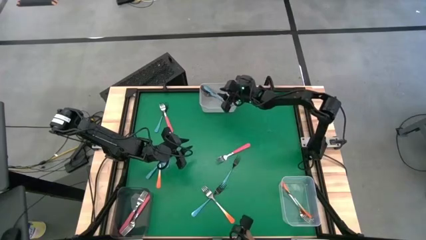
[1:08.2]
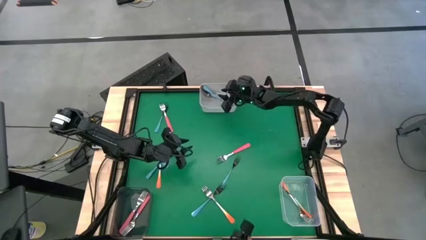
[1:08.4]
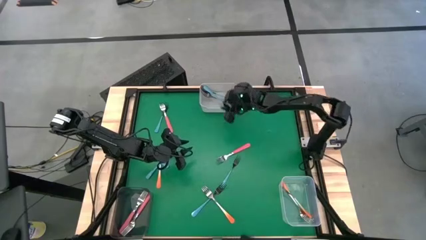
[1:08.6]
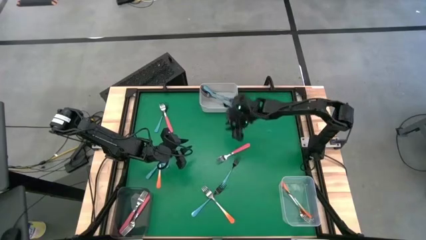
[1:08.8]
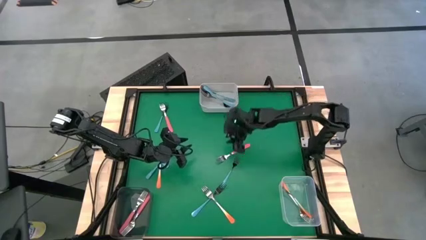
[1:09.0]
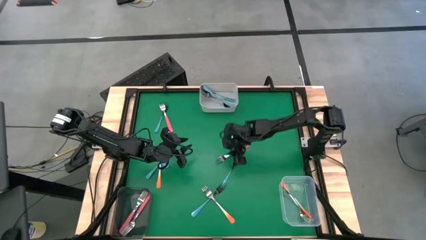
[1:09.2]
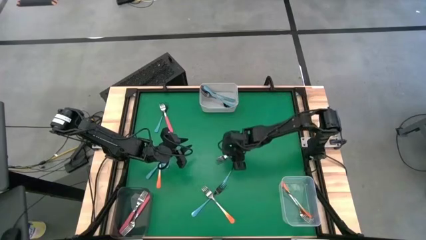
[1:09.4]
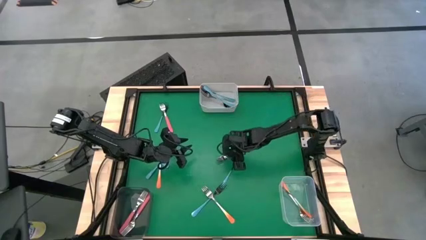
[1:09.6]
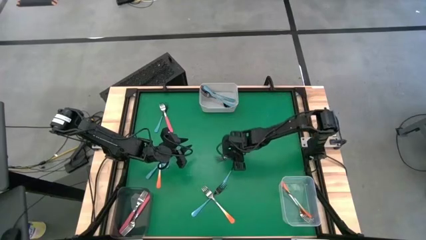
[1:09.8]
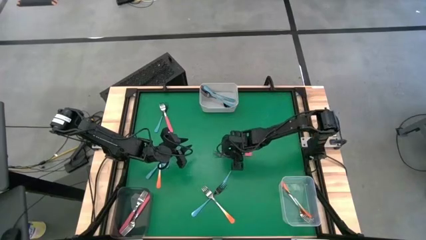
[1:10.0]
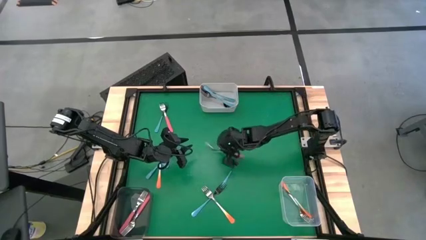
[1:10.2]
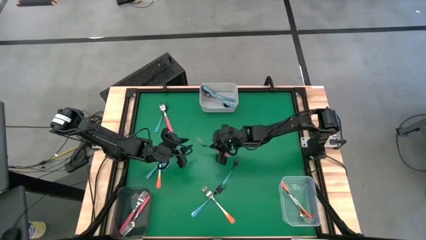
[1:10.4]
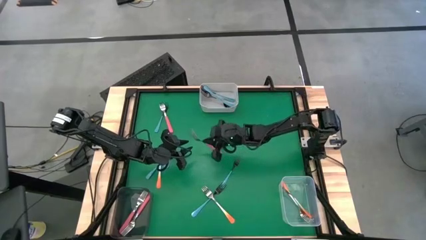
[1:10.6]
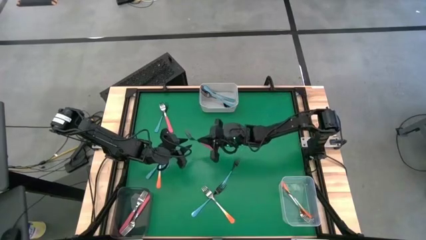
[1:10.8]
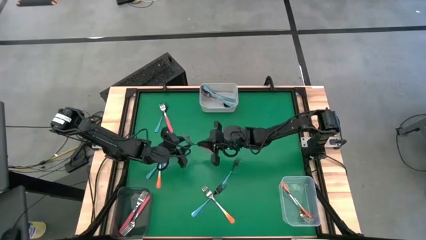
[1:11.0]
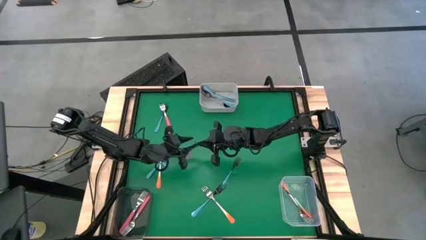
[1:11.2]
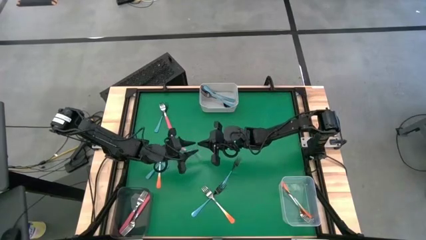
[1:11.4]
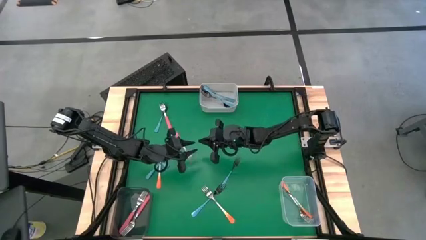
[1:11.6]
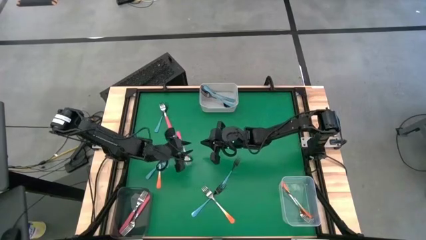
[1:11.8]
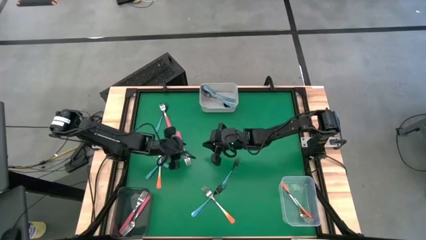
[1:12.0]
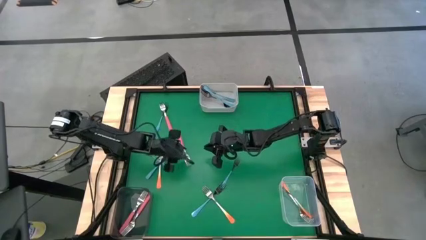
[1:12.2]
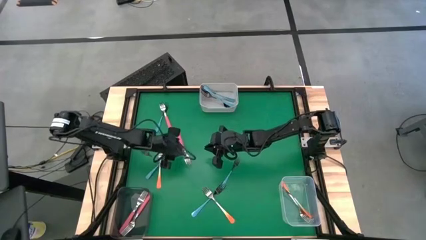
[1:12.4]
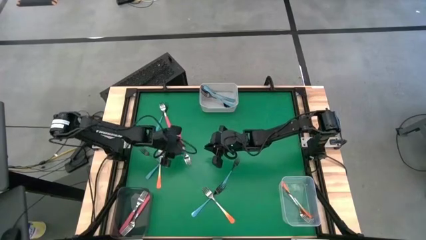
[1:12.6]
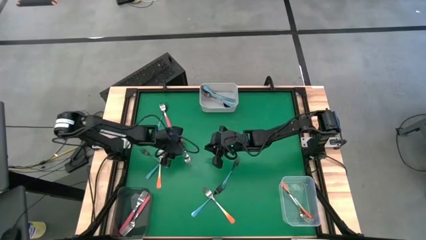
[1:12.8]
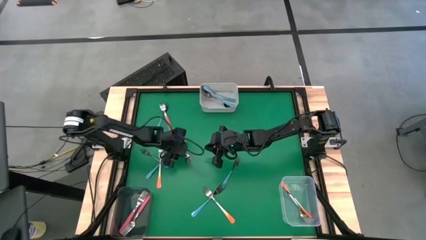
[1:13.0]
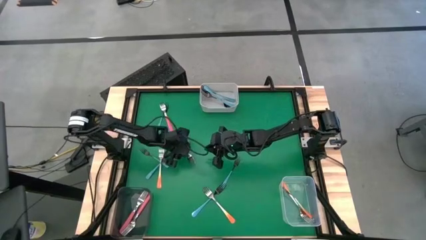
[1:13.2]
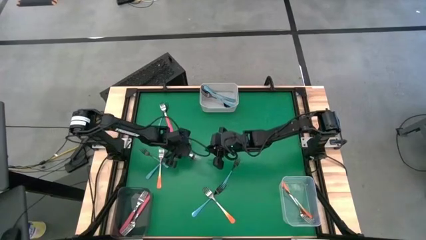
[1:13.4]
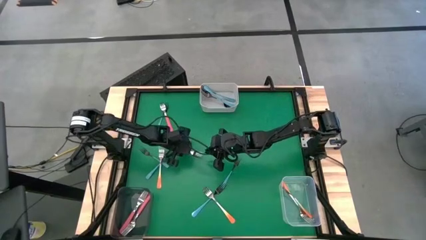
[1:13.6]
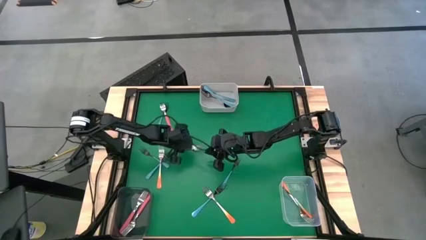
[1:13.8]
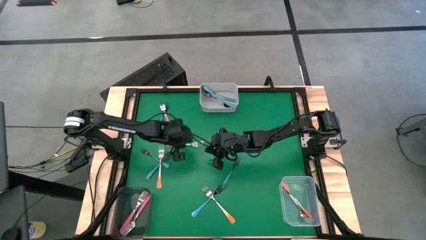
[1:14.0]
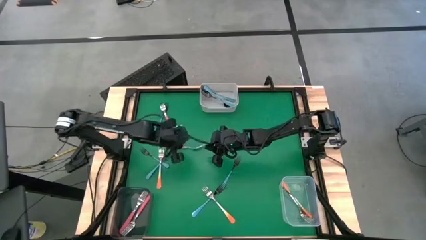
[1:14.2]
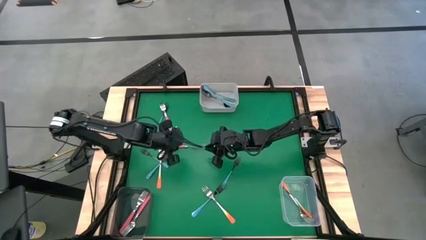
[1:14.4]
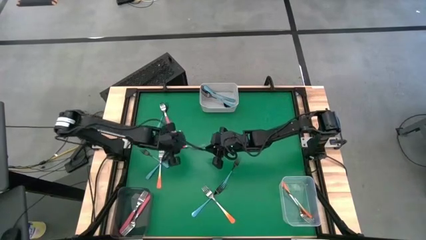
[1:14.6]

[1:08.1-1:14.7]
Task: Sort silverware by color (type)
Put the right red fork into the black bin

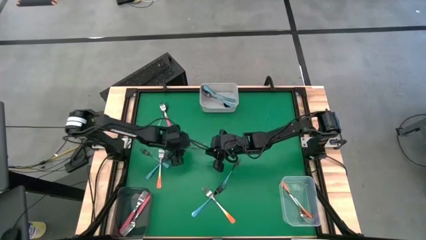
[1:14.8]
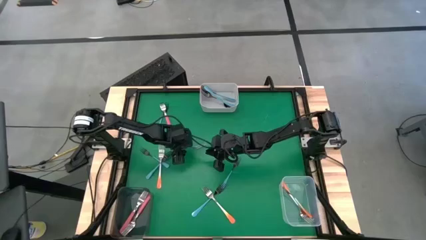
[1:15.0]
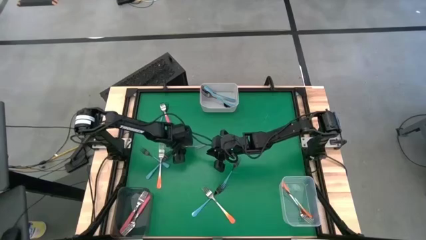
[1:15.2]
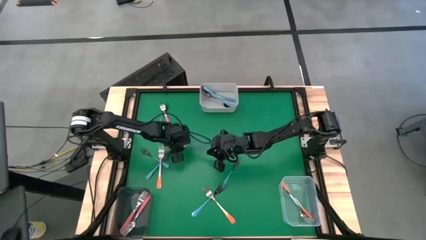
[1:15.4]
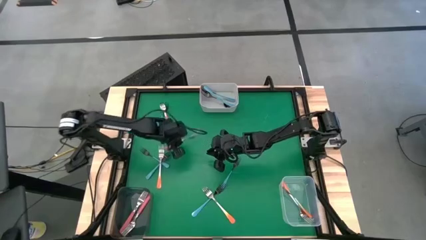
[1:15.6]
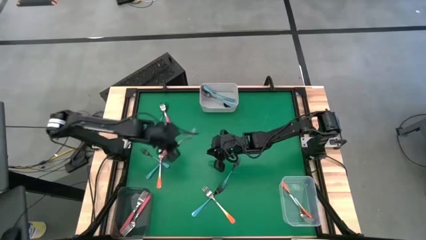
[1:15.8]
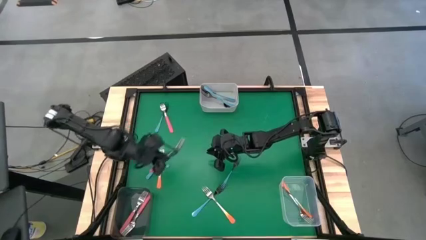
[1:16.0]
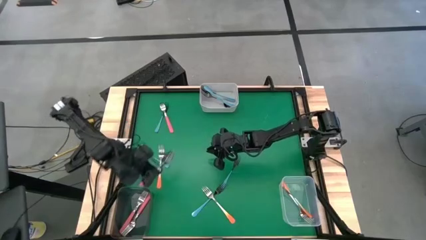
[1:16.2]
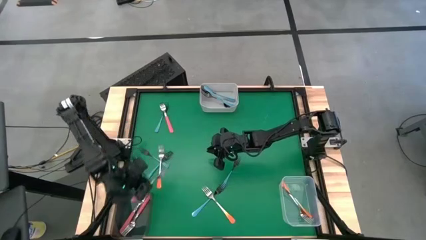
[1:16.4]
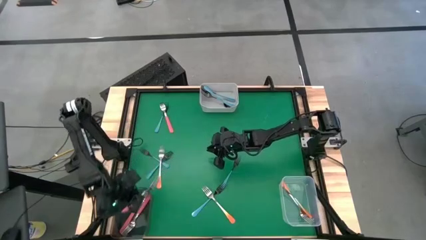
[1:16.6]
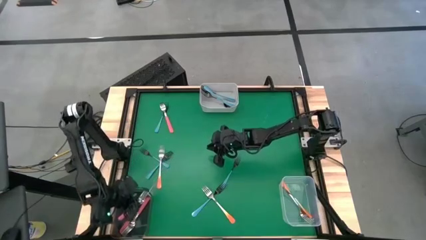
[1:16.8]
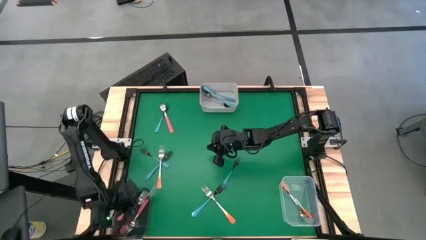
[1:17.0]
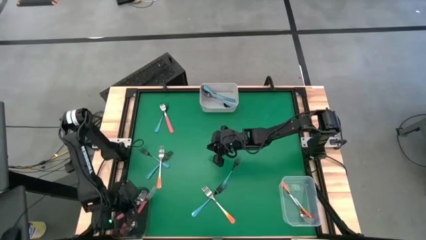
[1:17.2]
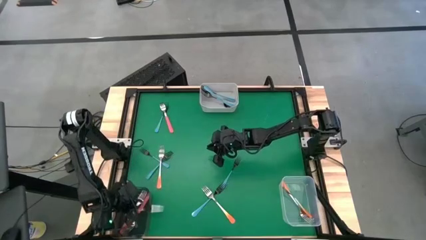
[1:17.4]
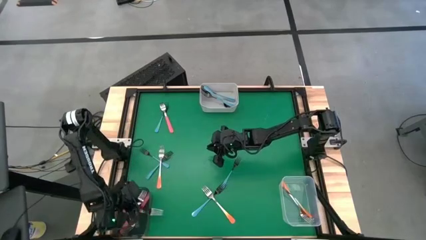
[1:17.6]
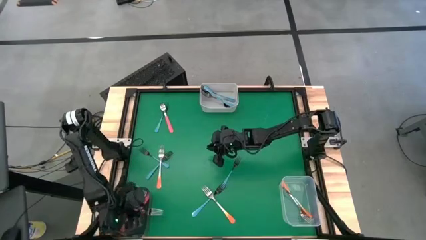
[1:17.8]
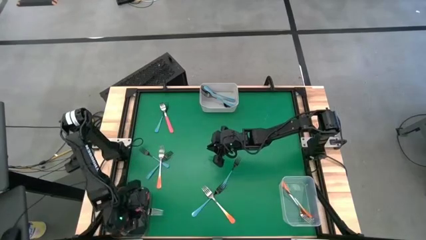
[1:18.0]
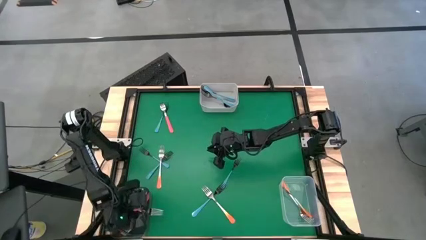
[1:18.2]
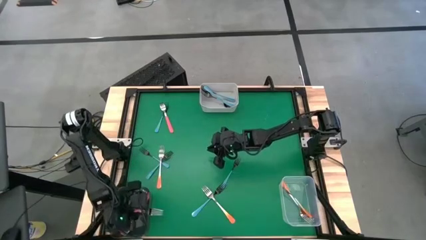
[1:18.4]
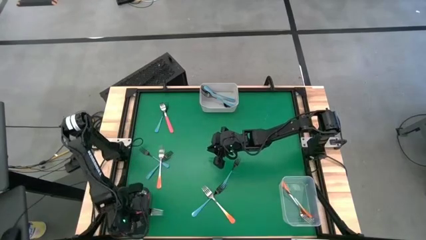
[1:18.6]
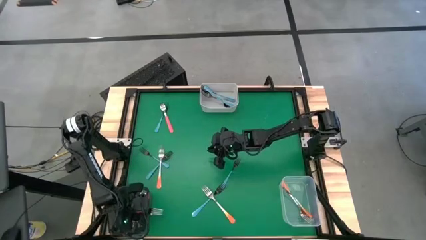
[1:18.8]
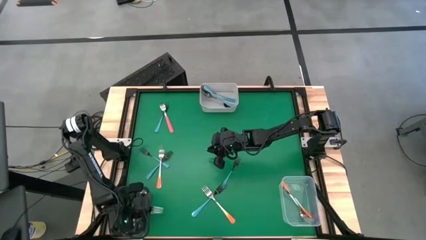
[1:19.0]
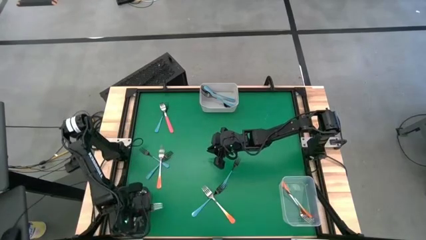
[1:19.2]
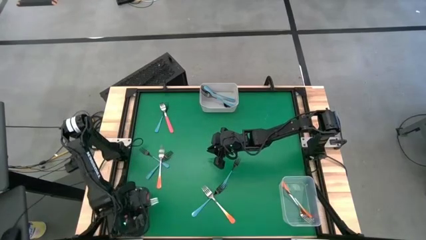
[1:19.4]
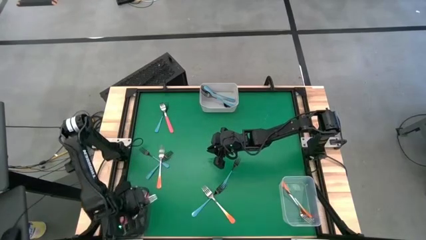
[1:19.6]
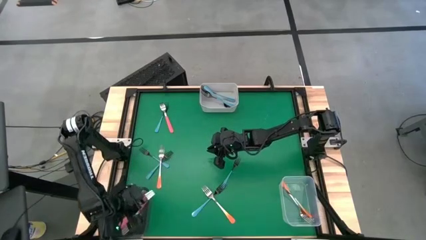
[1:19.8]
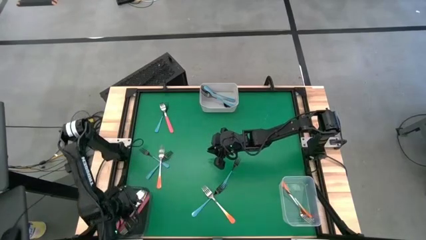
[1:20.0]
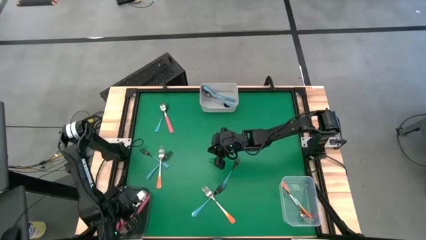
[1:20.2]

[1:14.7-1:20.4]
Put the right red fork into the black bin

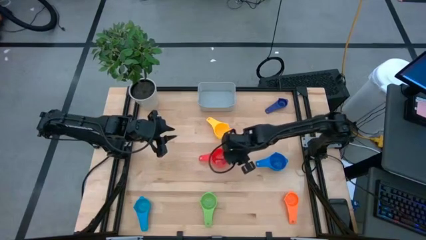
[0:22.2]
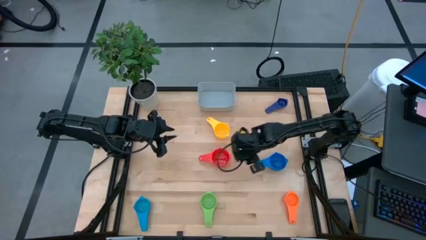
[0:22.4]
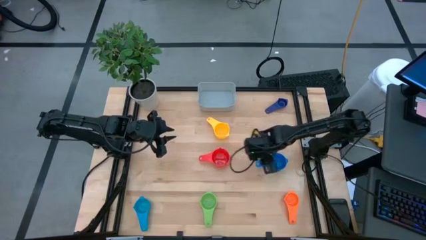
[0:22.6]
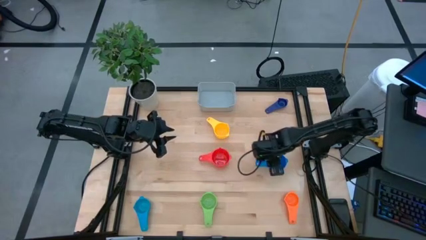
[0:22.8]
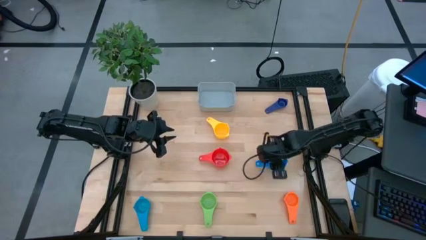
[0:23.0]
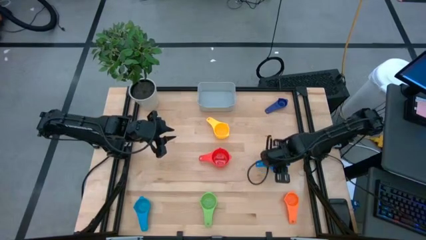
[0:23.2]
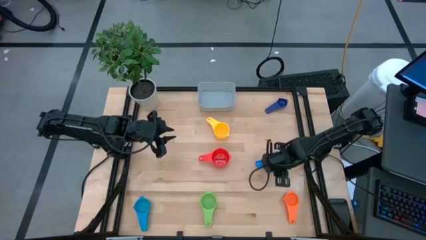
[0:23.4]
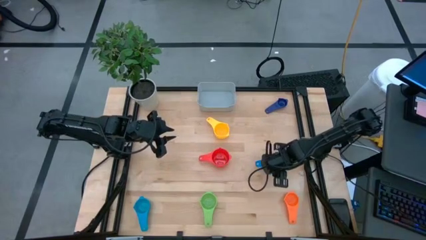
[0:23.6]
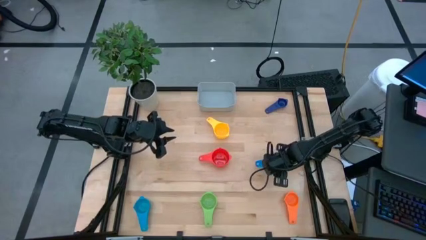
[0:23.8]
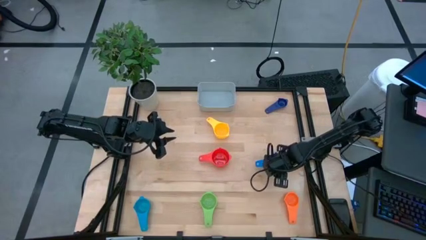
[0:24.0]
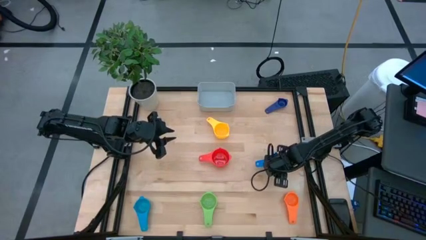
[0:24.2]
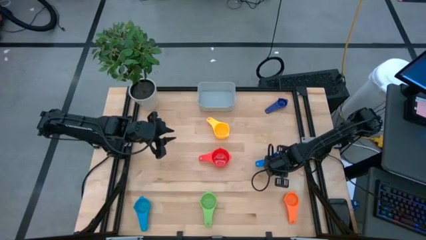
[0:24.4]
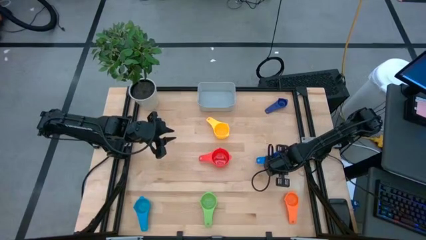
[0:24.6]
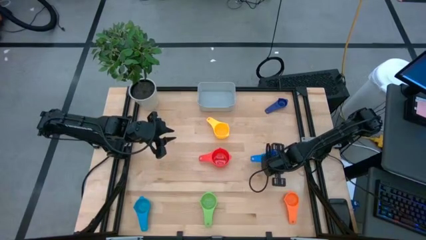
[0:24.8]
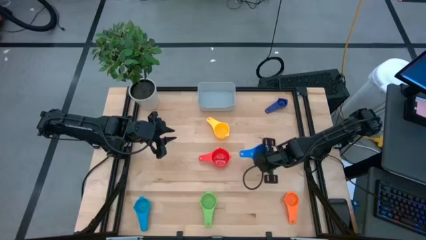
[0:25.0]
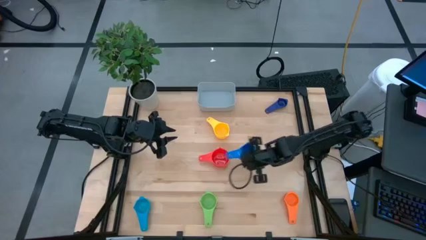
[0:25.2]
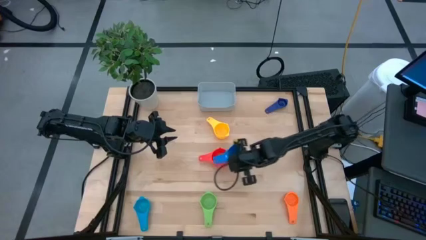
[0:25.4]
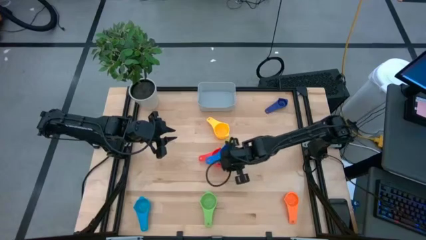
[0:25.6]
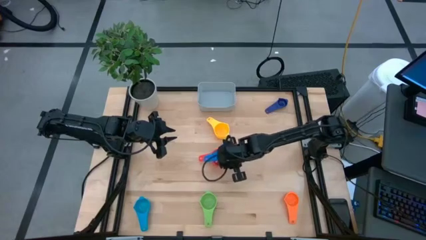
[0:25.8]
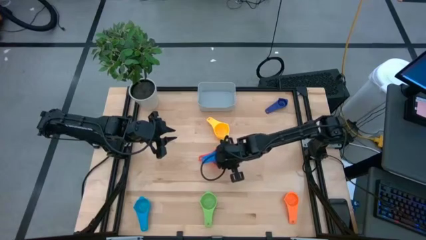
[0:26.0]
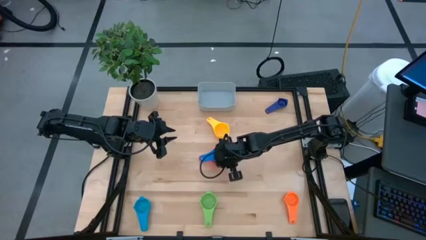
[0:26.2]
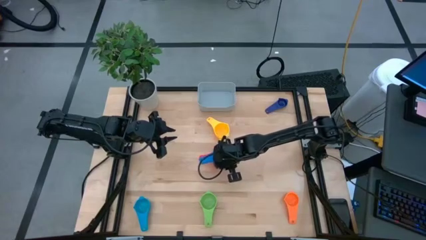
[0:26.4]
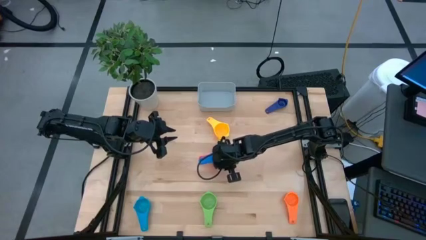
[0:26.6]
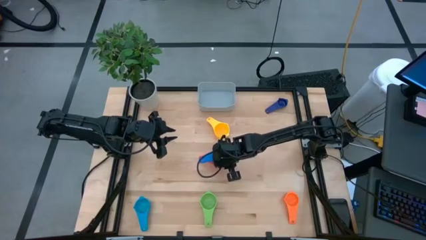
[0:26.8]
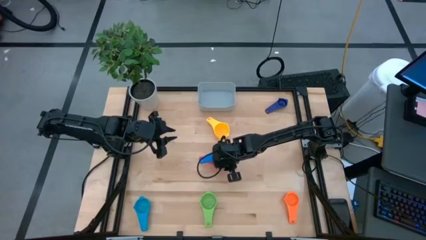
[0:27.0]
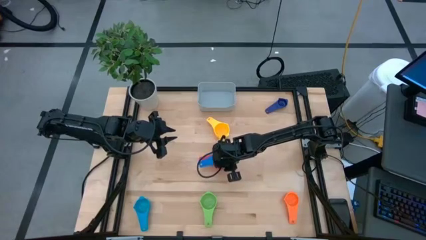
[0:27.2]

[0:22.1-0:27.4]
Task: Nest measuring cups in basket
Stack the blue measuring cup on top of the red measuring cup
